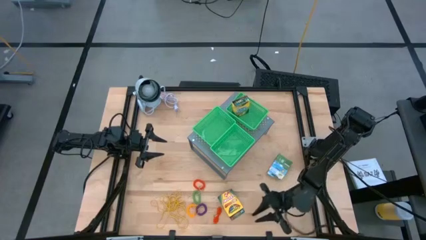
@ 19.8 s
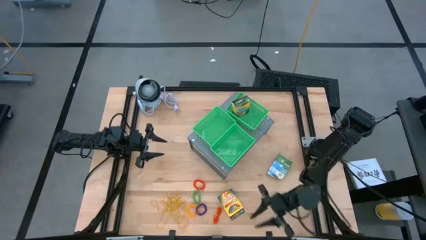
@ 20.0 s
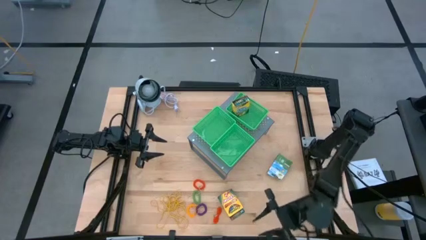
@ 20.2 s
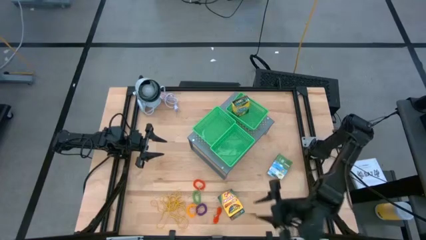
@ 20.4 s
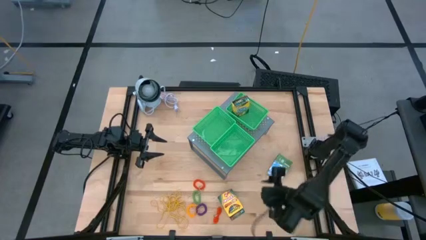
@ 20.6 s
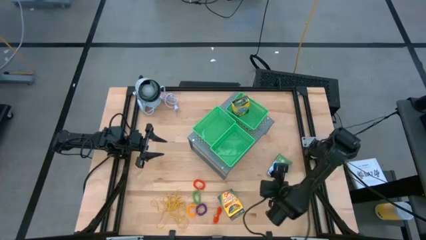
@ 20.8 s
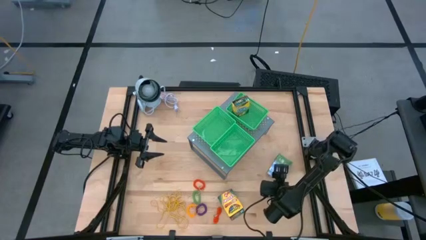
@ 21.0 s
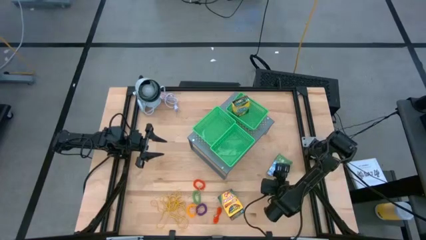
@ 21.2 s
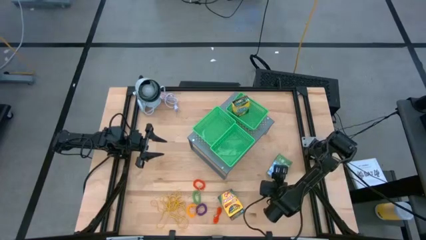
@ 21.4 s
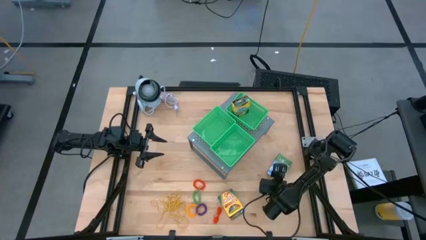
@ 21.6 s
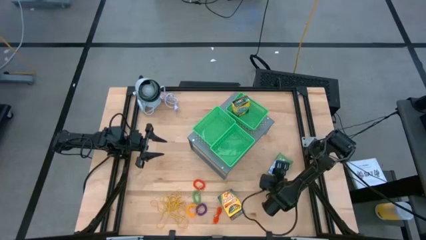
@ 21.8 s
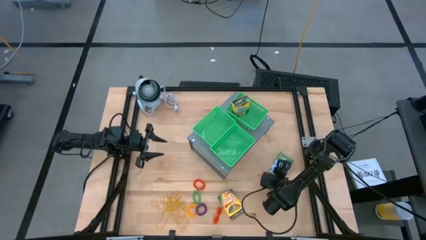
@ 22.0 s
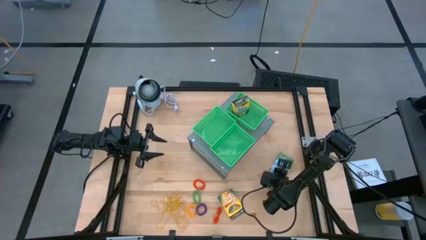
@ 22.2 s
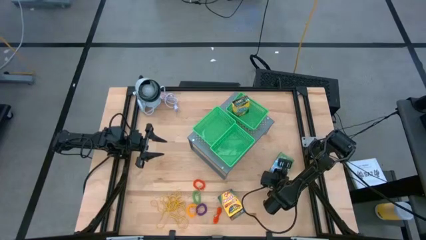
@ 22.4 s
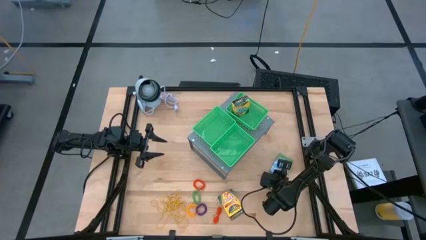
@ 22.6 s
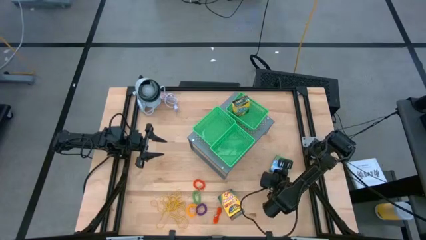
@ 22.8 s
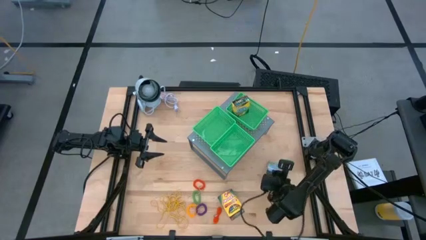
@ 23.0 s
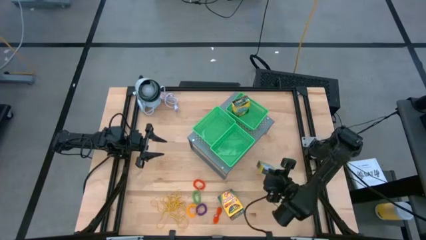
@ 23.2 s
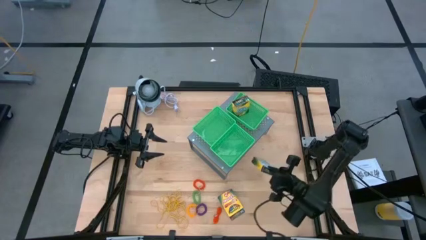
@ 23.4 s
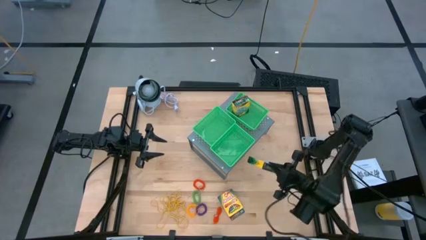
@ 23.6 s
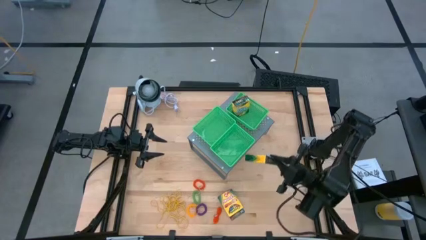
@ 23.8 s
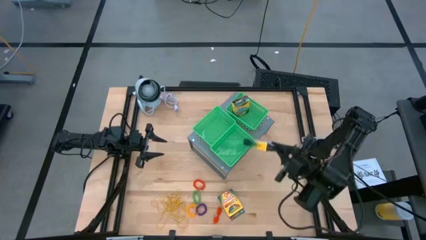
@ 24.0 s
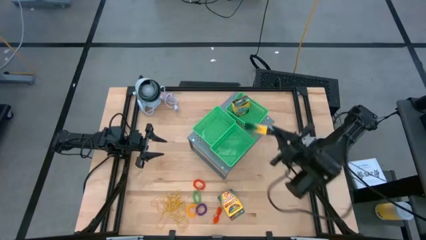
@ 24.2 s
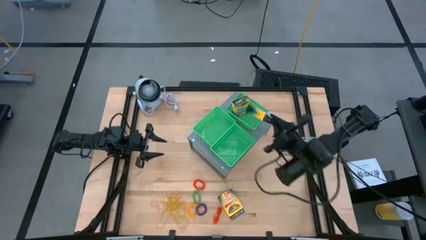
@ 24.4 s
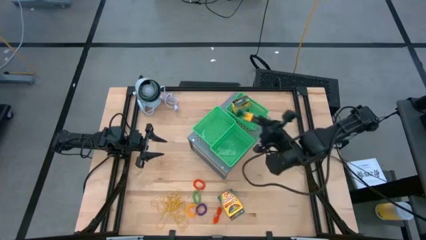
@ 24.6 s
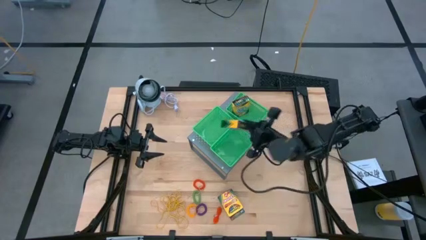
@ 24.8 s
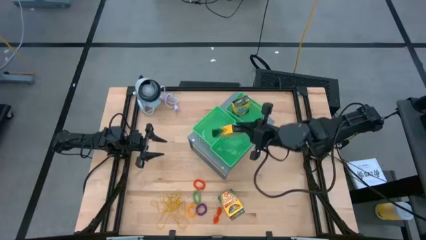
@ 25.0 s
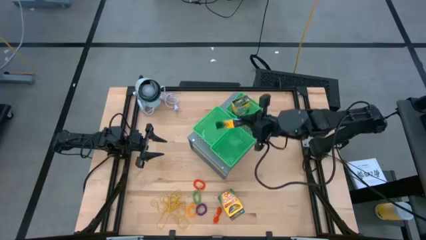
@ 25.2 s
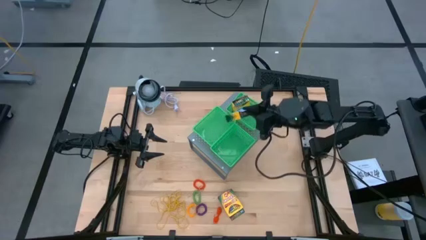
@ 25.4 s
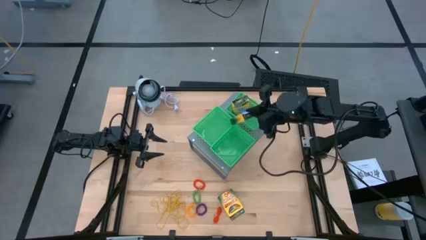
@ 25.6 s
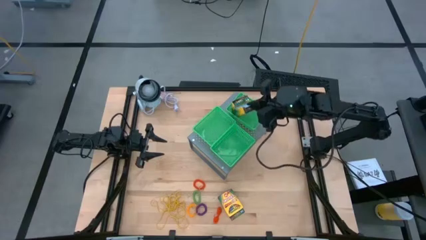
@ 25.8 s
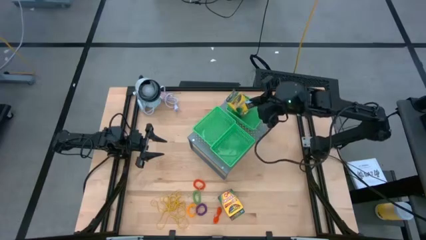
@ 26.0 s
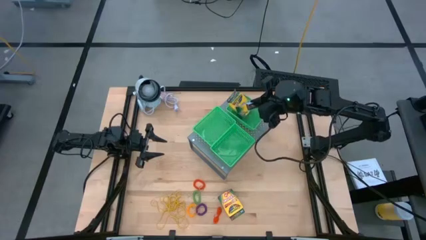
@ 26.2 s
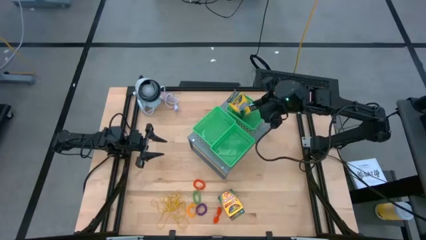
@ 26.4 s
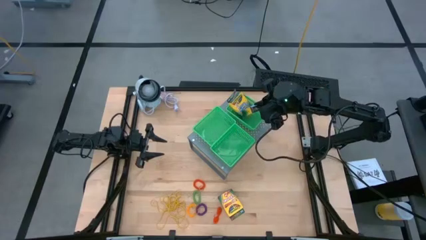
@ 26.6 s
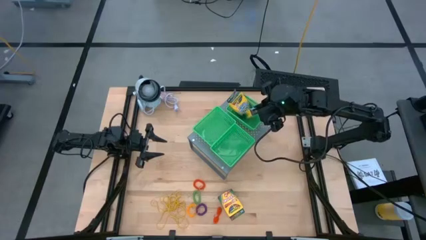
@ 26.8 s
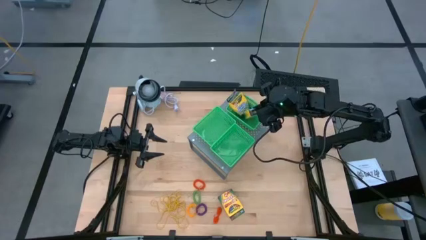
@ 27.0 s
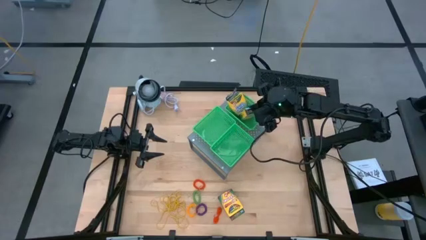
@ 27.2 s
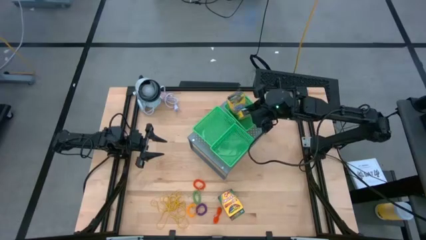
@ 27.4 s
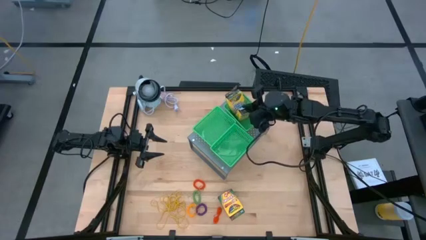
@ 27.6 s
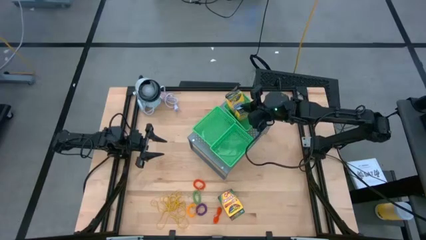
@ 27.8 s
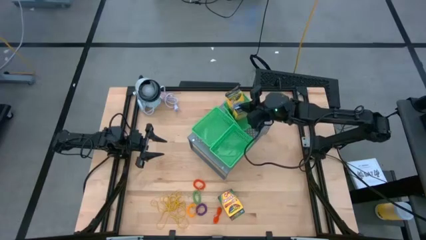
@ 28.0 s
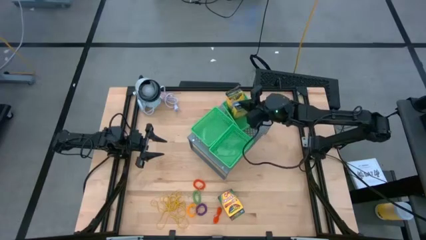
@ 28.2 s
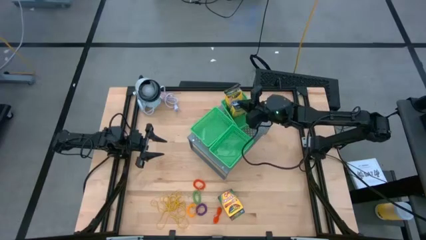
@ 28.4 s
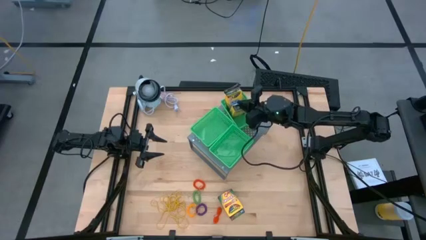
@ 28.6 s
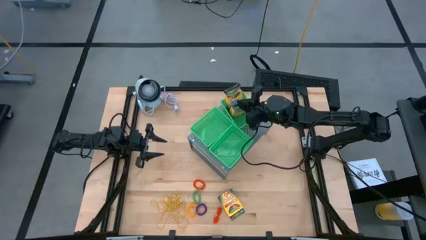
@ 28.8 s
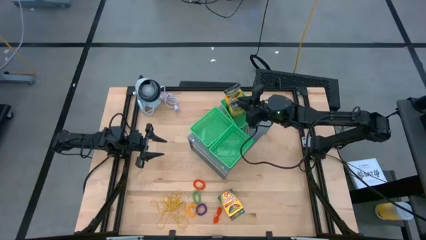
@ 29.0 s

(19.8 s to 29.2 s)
Task: Pick & Place Office Desk Supplies
Put the yellow crayon box into the top right green bin on the shelf

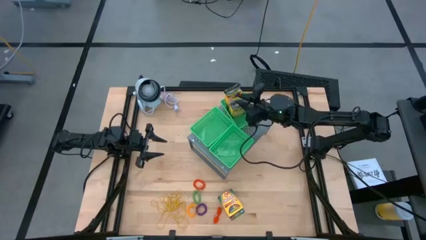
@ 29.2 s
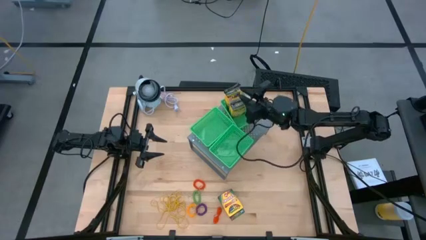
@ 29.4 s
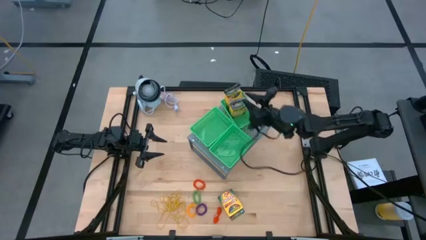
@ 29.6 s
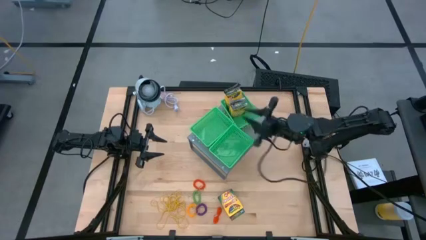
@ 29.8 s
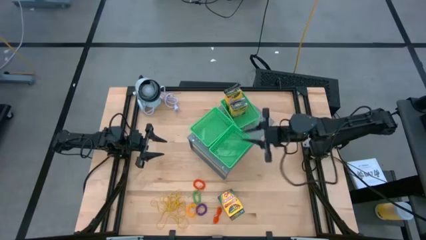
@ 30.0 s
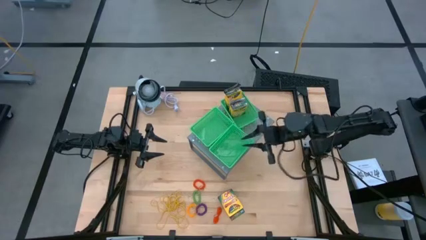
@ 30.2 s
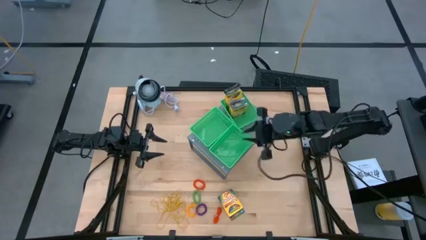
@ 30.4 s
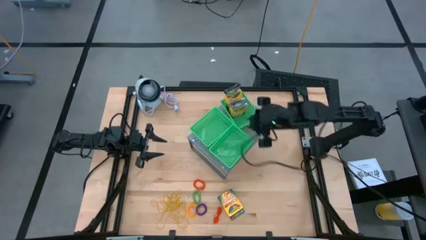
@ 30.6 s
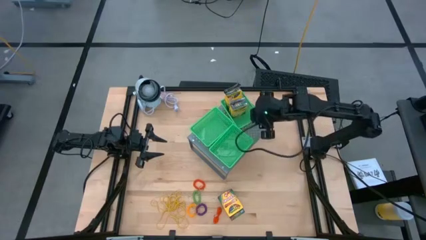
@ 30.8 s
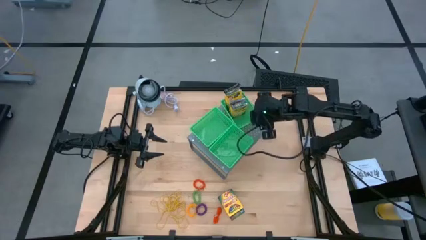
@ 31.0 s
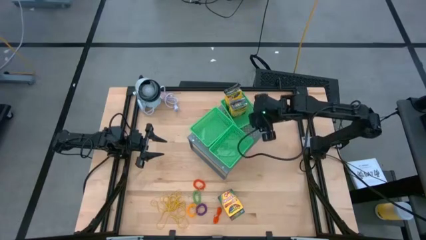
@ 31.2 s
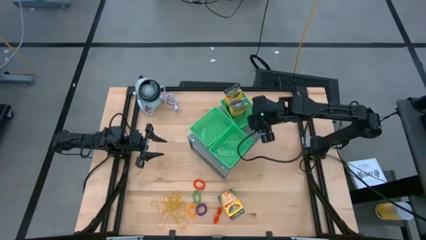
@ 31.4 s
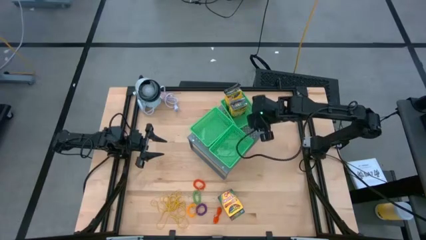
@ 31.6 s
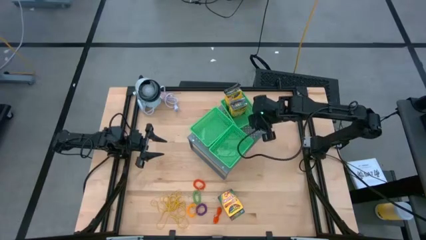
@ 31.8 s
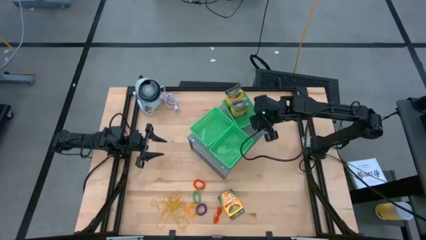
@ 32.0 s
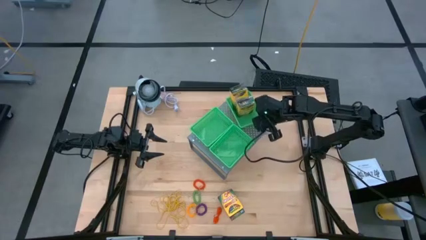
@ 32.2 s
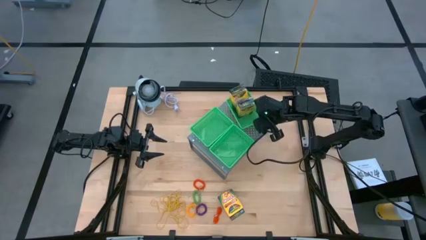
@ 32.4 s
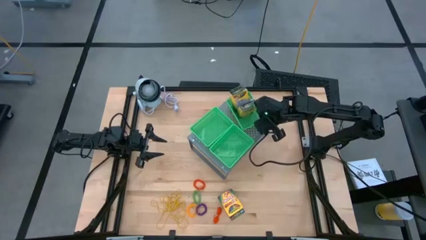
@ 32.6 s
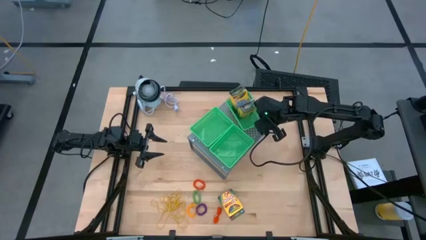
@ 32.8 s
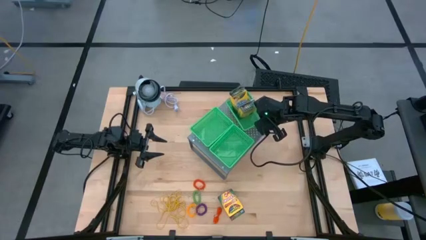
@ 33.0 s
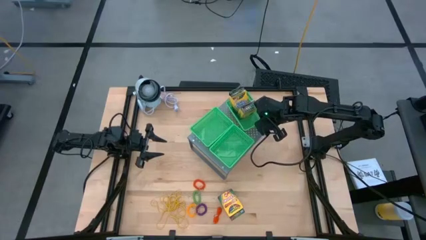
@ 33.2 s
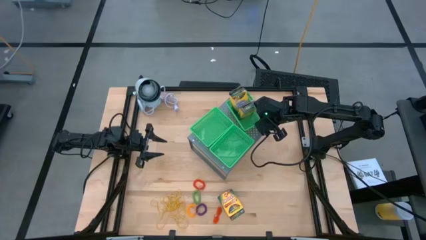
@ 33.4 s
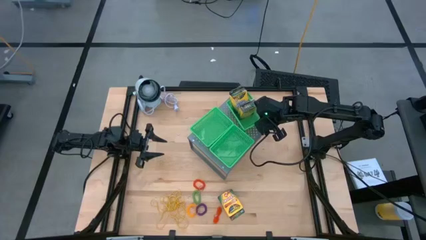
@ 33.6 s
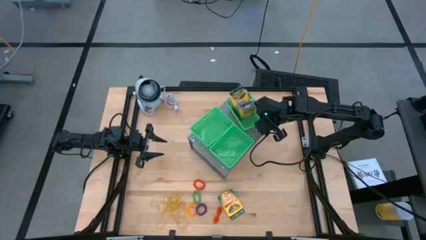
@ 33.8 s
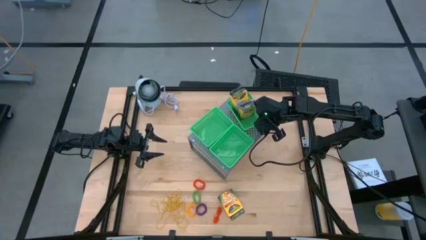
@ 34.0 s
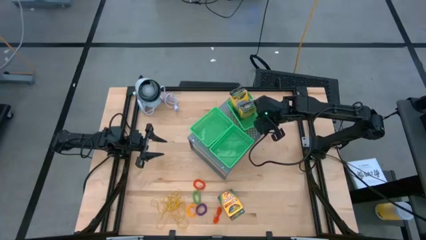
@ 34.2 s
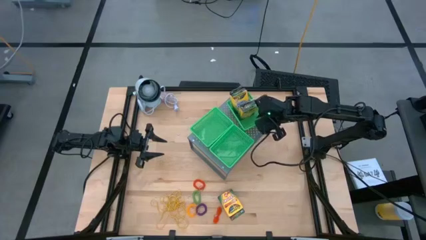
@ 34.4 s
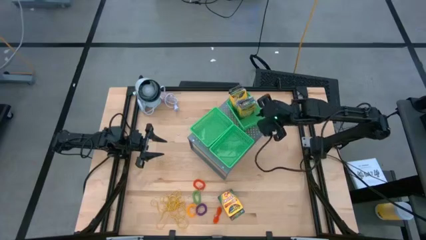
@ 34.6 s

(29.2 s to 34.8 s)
Adjust the top right green bin on the shelf

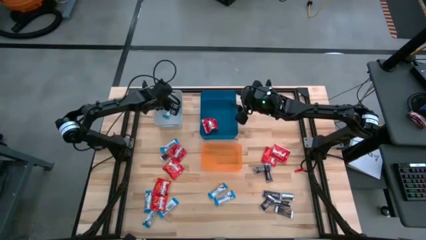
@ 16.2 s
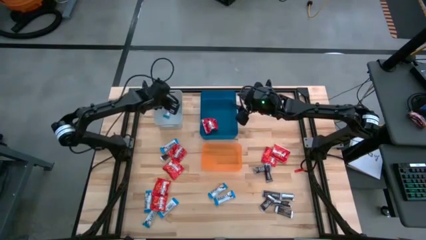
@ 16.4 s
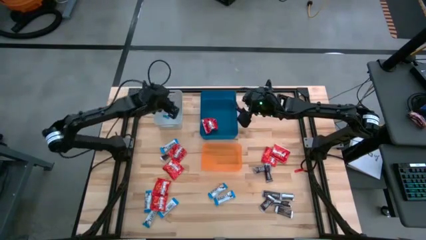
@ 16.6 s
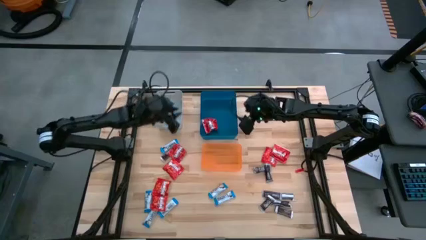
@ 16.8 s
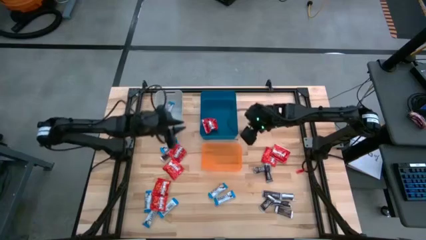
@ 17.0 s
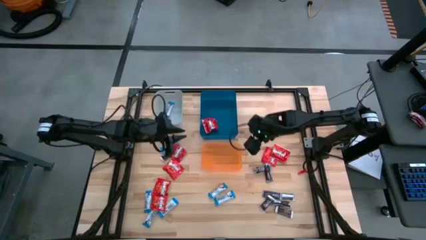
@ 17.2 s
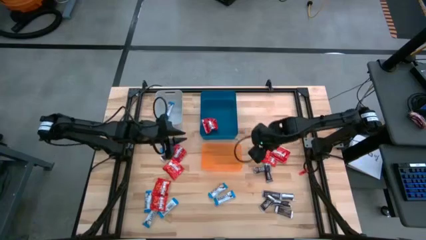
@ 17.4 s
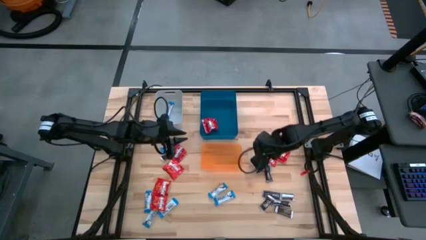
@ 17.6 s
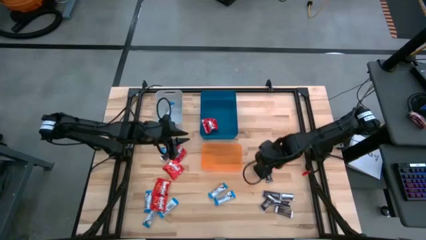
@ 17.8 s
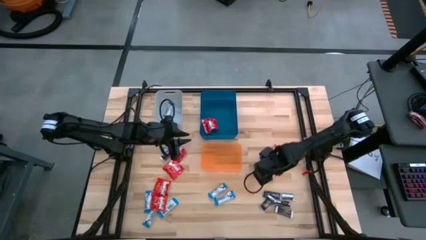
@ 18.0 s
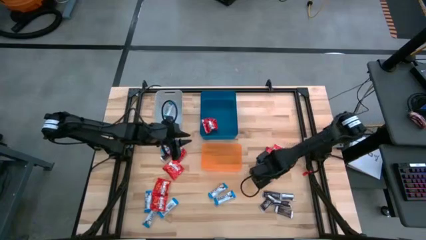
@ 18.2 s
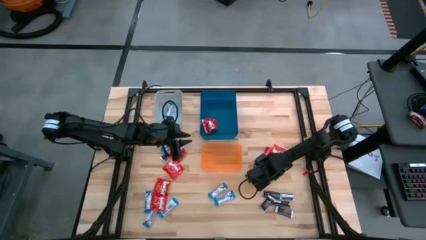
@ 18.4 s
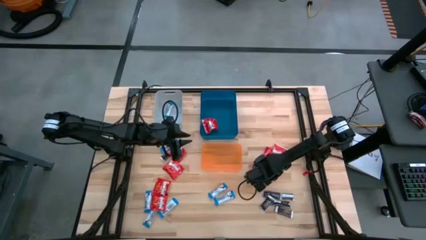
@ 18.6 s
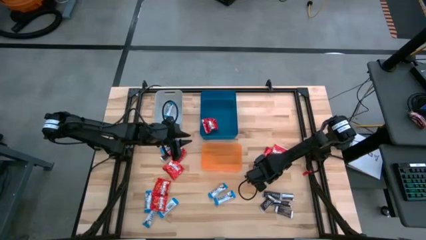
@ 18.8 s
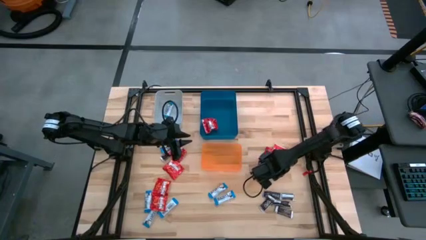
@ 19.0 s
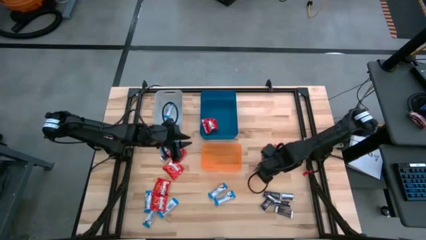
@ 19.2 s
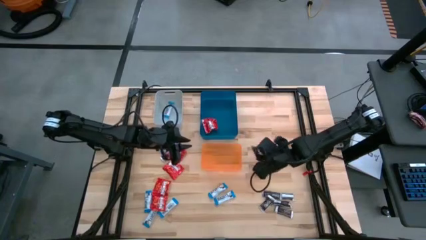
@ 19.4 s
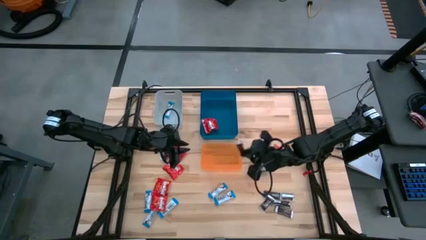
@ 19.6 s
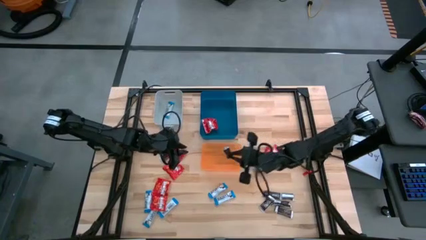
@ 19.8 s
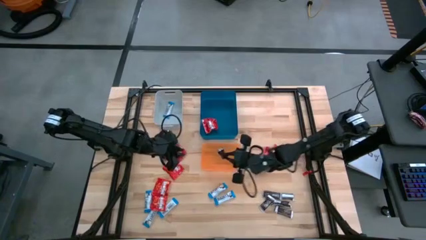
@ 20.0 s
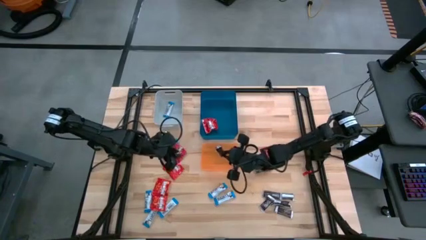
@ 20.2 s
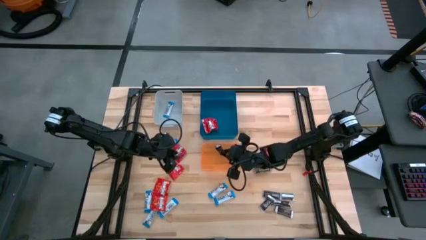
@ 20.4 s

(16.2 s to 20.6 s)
Task: Sort candy
Put the brown chocolate bar into the orange bin
